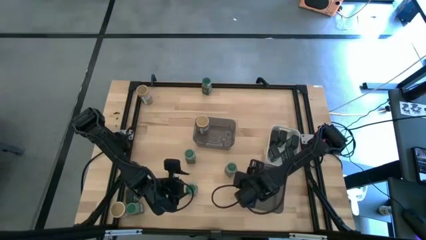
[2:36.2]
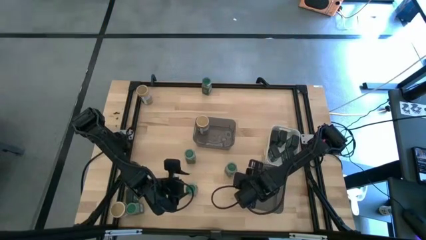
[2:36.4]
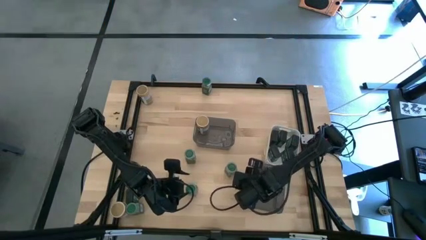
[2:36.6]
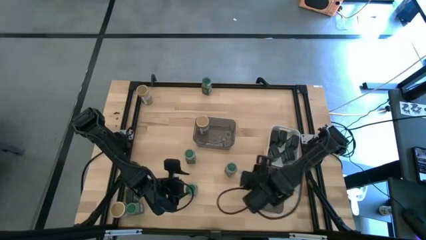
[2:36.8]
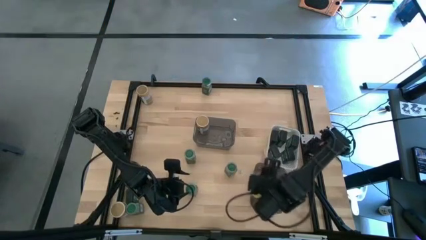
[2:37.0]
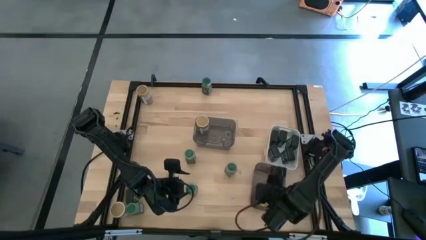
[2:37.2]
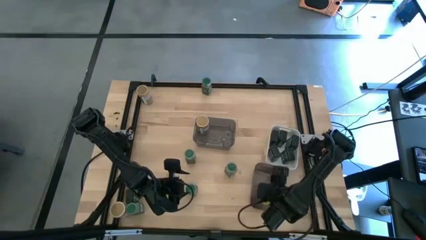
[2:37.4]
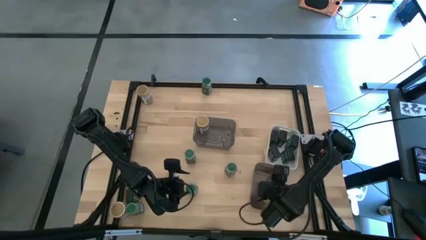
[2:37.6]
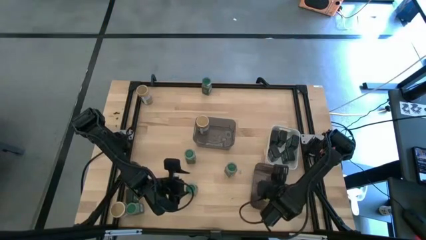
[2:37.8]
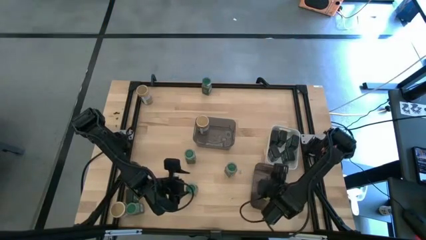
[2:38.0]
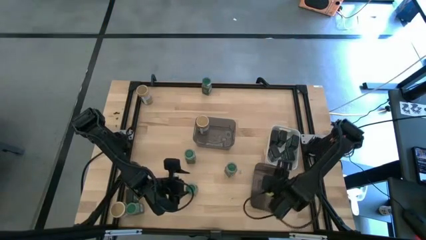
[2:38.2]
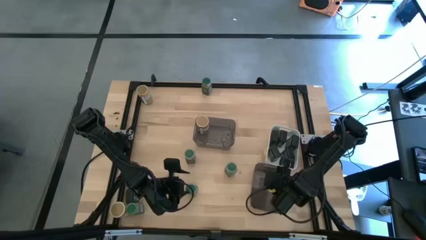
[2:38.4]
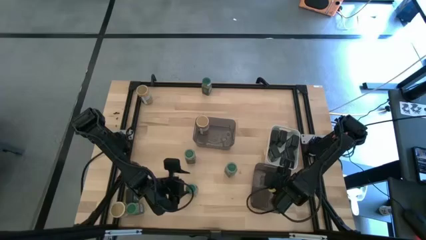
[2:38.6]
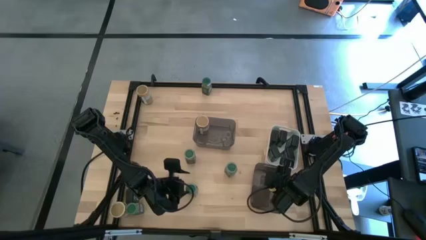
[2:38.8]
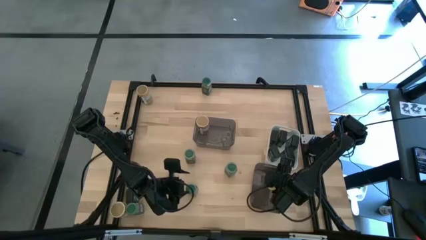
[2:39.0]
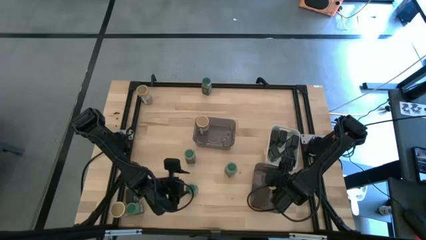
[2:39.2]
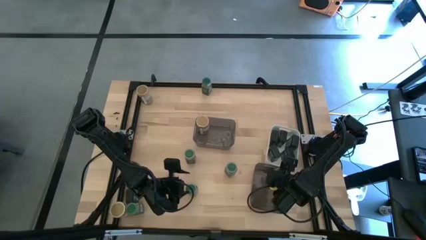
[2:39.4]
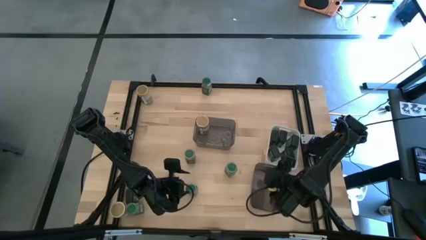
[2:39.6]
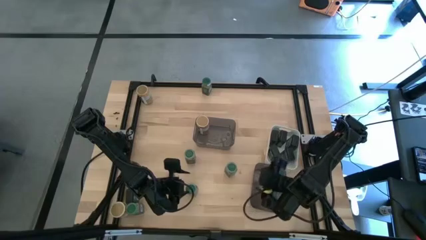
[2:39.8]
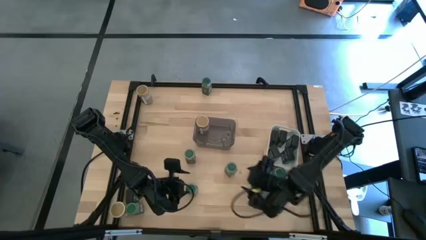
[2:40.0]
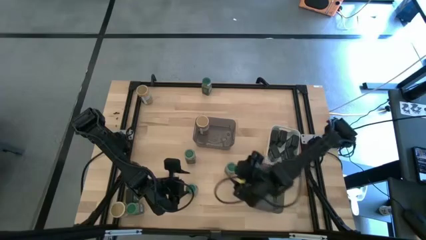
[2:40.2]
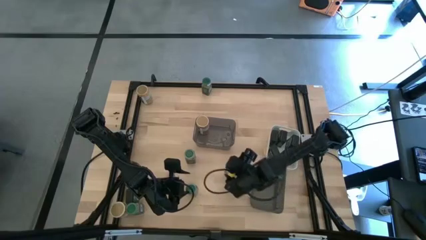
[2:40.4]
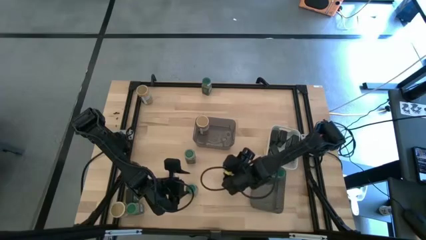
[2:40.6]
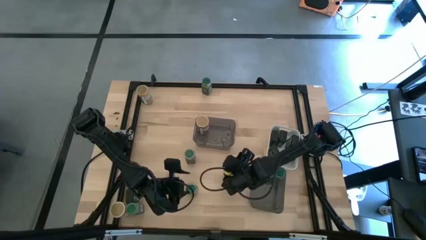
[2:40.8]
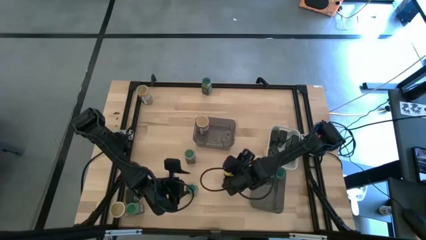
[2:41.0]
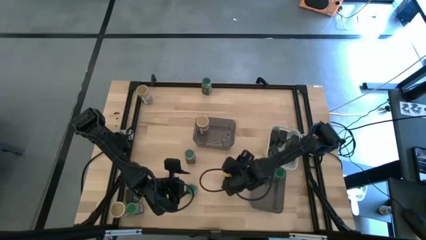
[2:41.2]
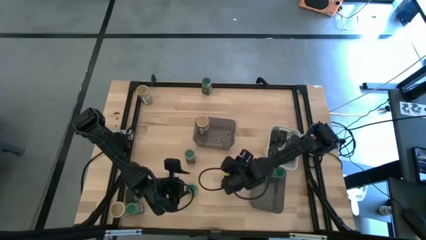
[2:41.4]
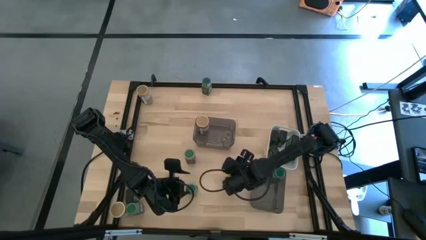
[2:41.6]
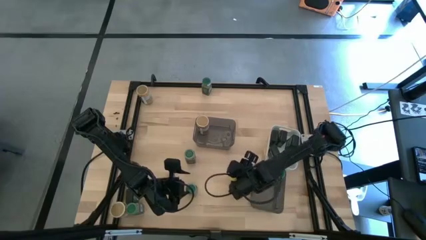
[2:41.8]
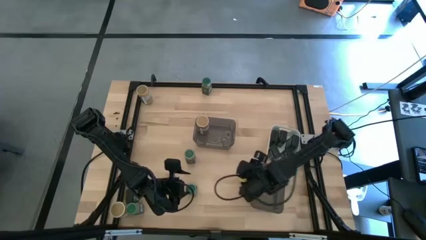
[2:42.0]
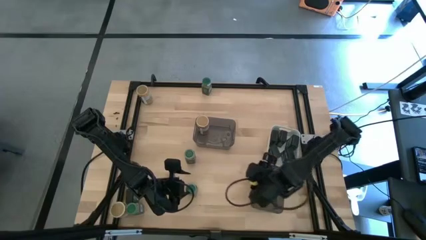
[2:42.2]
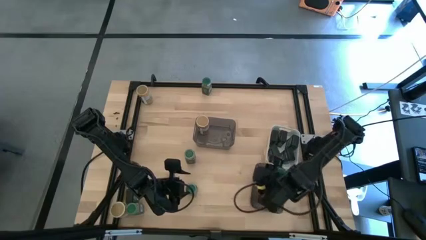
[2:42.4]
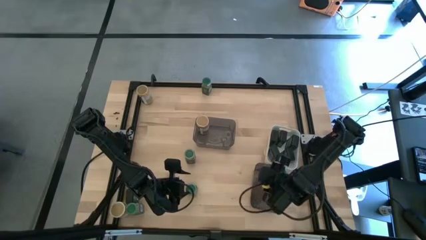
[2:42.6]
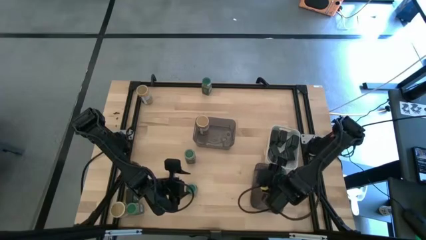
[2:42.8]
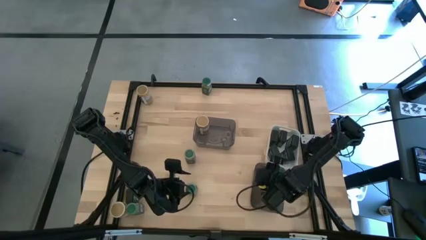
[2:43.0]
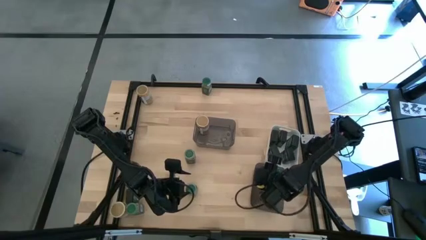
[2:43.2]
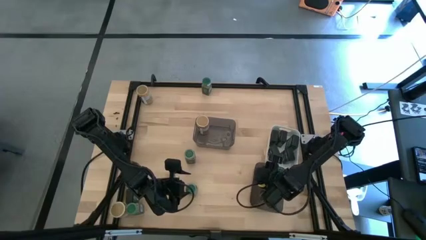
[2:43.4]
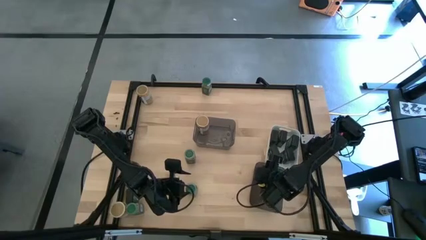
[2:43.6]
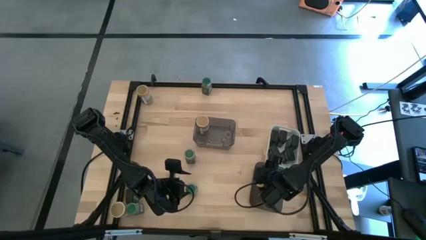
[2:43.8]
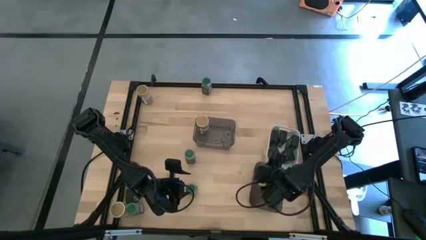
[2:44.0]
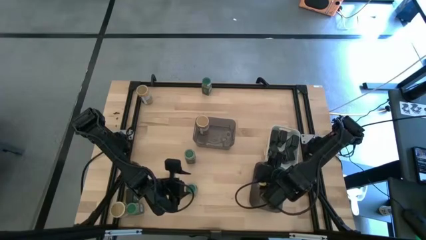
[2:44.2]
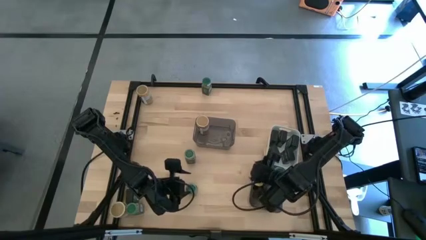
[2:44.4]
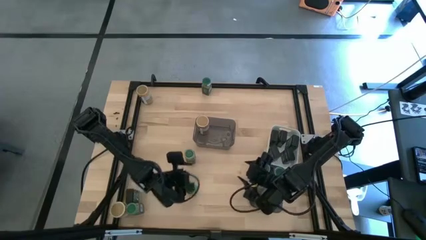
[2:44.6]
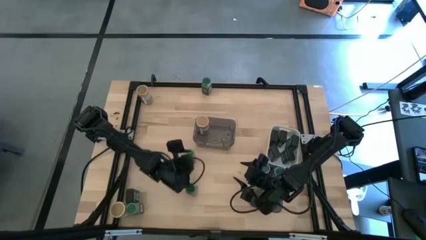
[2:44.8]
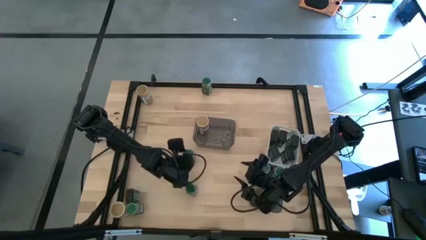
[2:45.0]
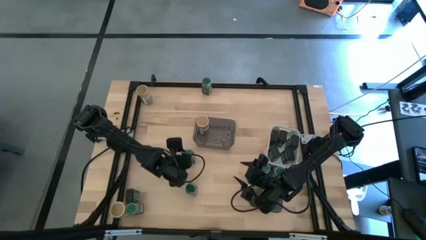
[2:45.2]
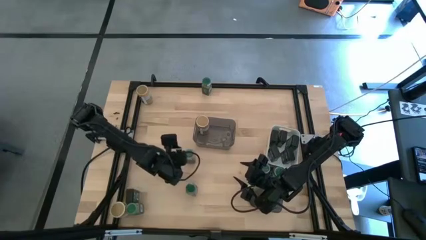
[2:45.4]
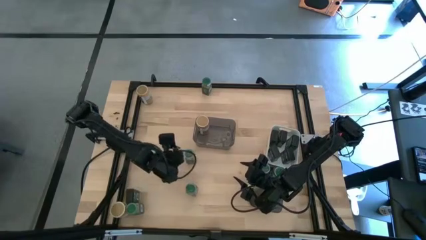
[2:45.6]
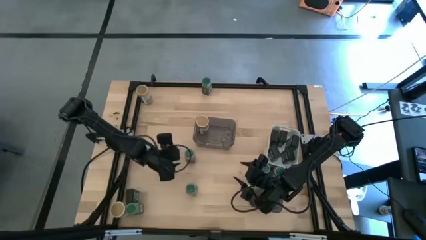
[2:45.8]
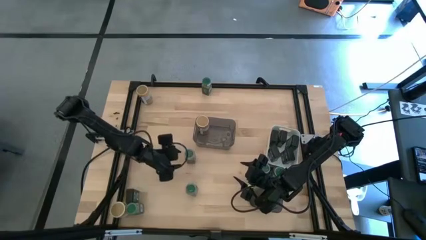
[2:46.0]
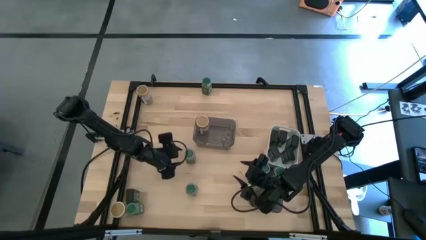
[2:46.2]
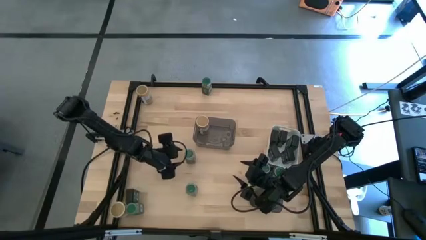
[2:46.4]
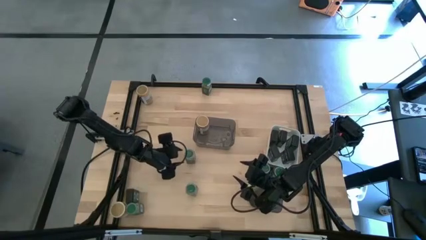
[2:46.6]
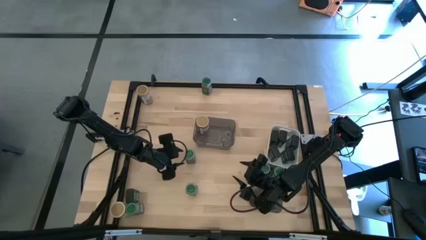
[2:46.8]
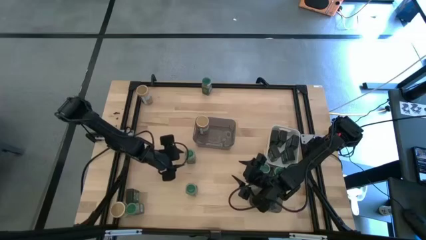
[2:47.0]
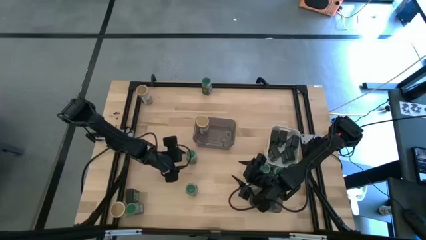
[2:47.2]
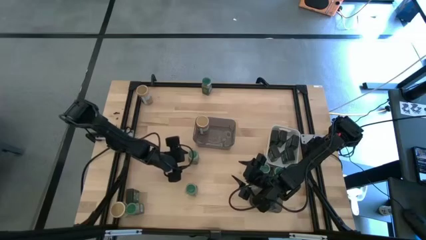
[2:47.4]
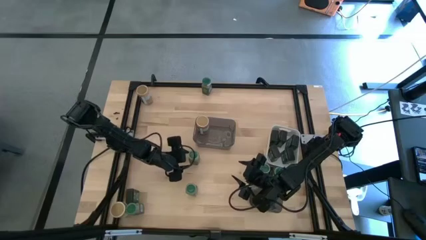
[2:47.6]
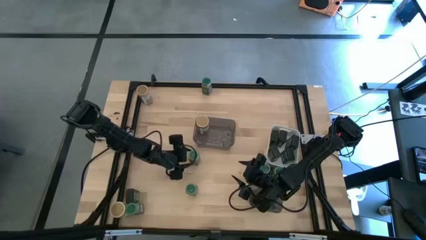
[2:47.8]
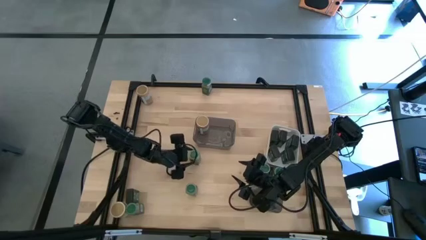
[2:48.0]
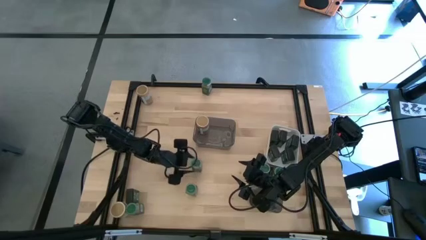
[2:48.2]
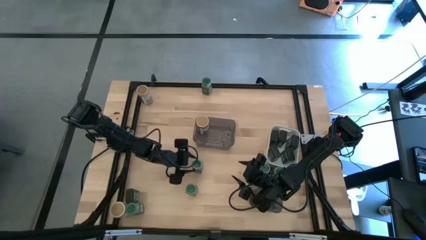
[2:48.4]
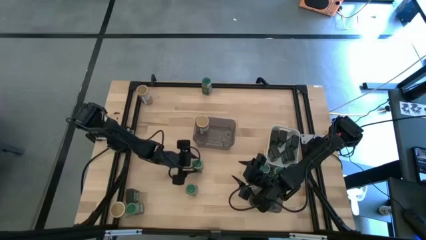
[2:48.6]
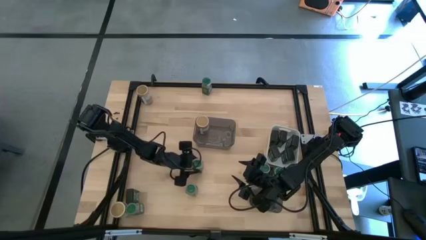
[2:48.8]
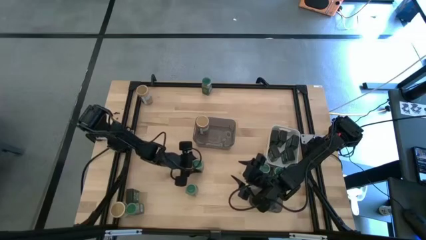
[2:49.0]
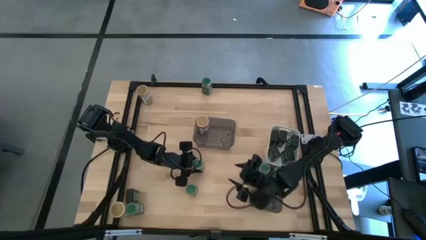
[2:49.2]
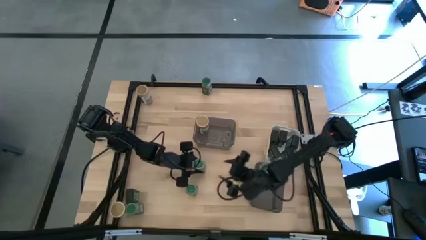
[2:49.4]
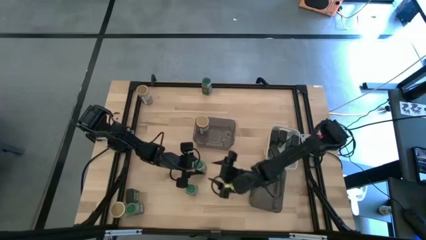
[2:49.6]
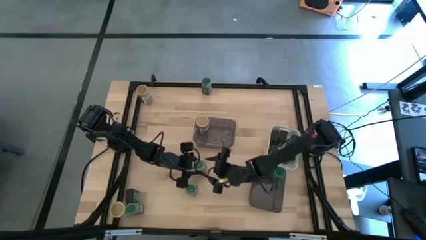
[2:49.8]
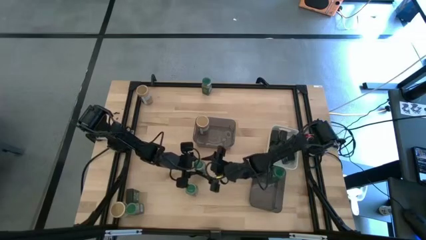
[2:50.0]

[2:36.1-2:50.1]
Task: Sort spices by type
Put back all the green seasoning bottles into the bottom black bin

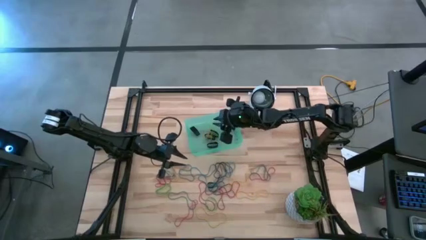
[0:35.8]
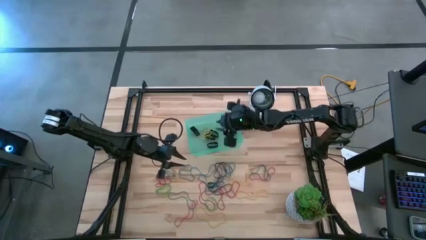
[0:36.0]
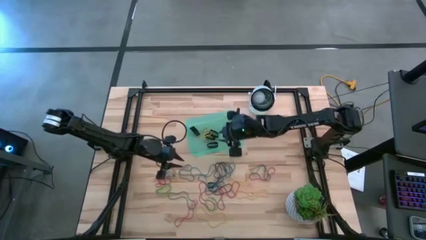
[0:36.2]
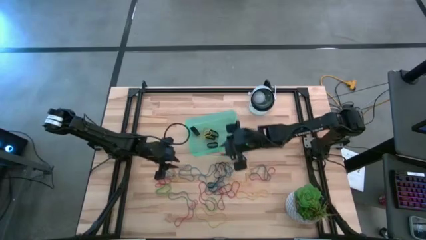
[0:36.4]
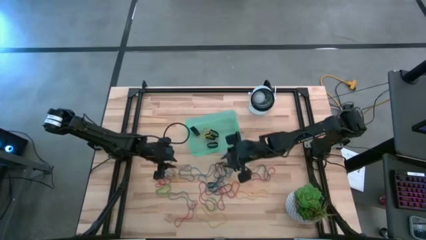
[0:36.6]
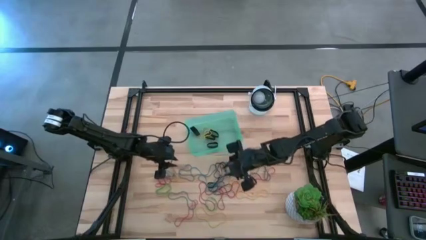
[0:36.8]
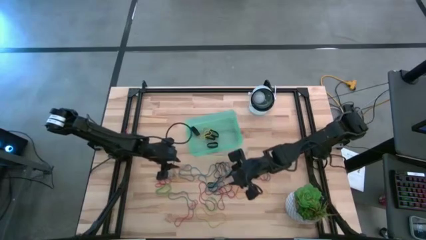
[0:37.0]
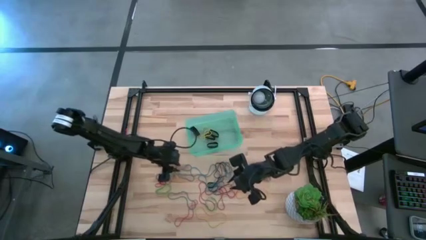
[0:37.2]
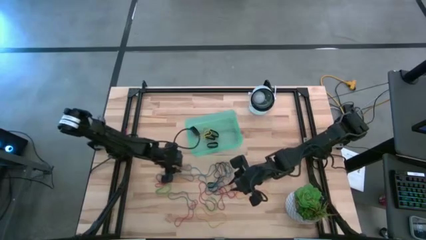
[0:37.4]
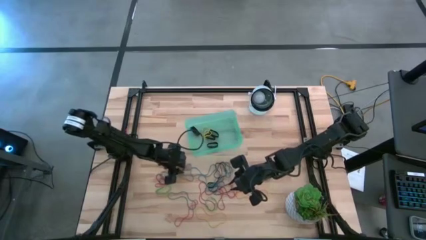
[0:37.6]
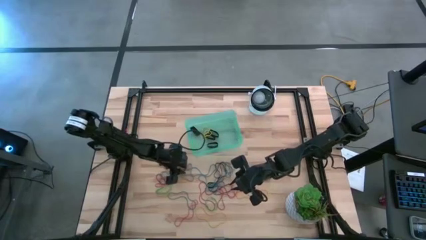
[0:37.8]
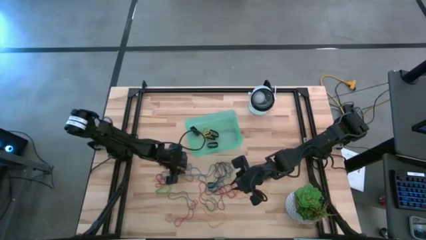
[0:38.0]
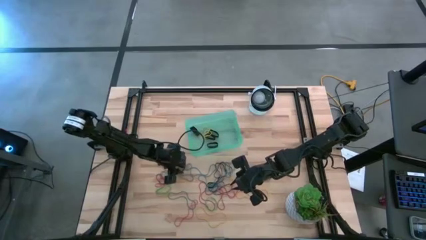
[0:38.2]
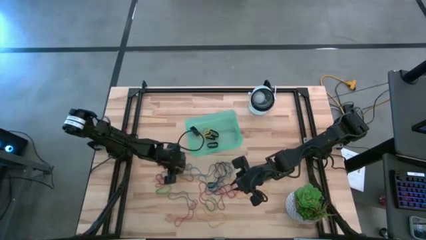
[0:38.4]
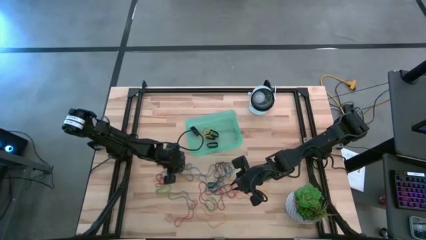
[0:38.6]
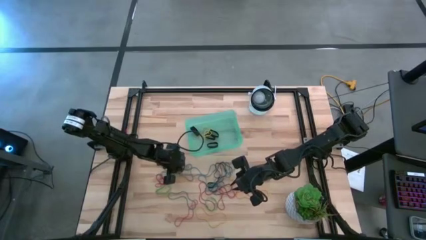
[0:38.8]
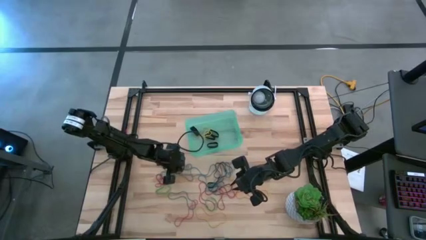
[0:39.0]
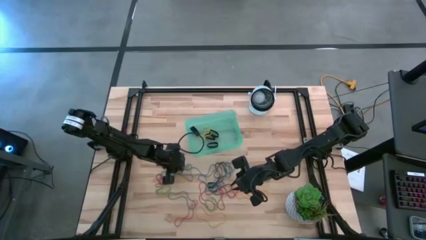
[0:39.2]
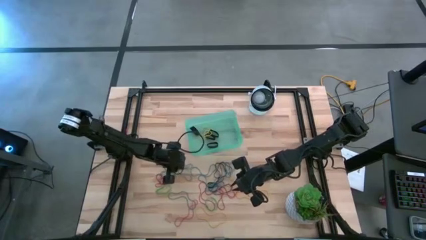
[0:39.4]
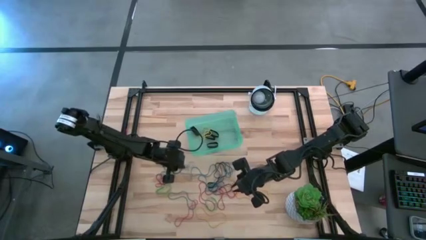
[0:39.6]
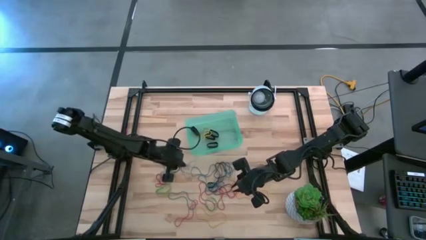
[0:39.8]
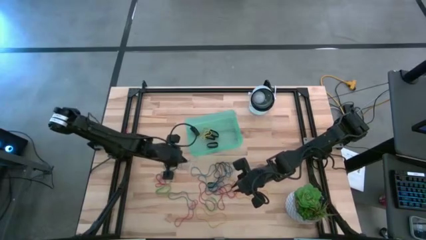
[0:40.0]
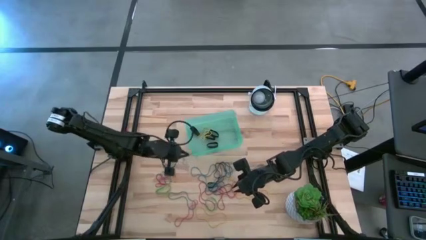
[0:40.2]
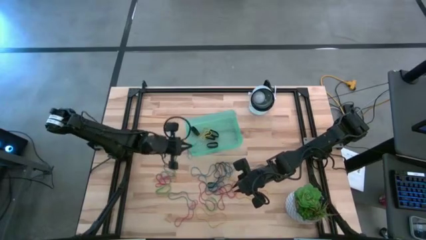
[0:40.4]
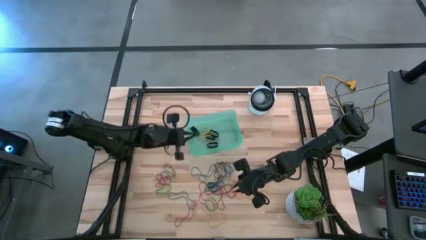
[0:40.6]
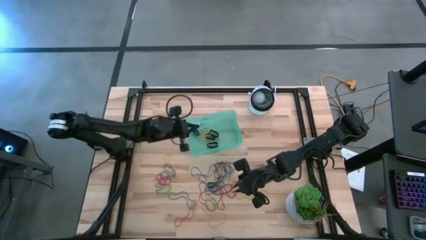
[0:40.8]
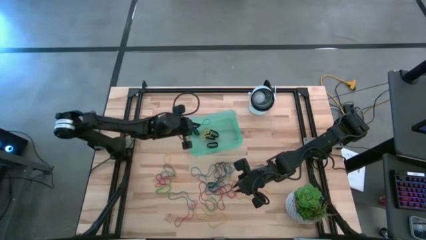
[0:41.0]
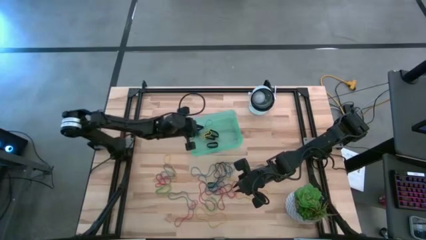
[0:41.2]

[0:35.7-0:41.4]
Task: Pick and place rubber bands into bin
Put the blue rubber band into the green bin
